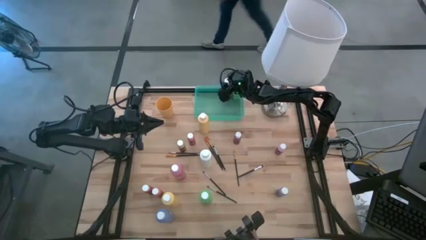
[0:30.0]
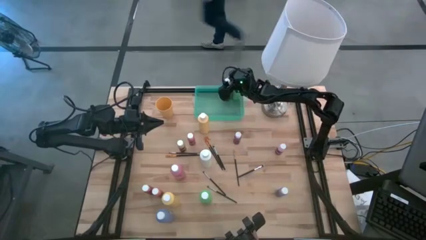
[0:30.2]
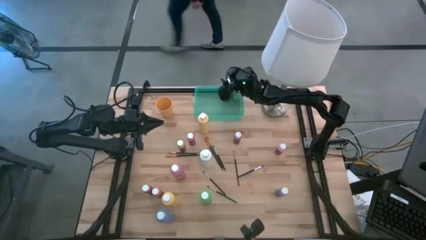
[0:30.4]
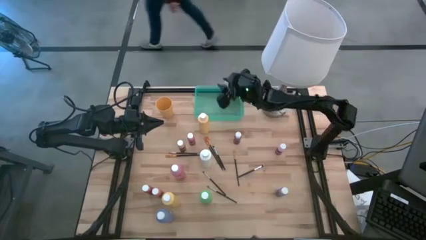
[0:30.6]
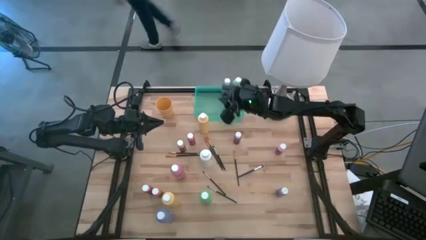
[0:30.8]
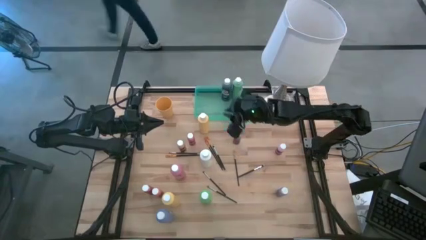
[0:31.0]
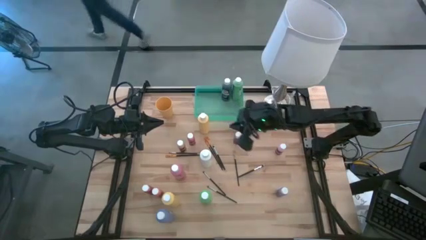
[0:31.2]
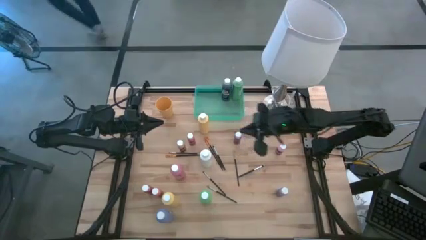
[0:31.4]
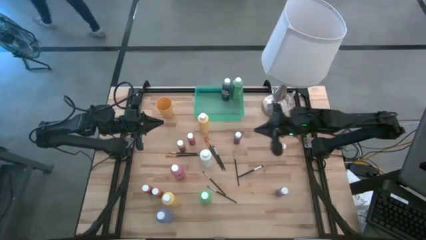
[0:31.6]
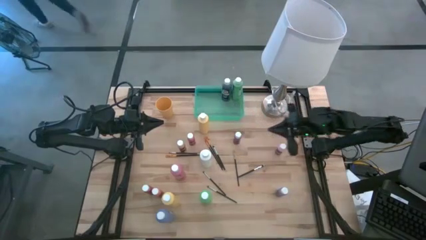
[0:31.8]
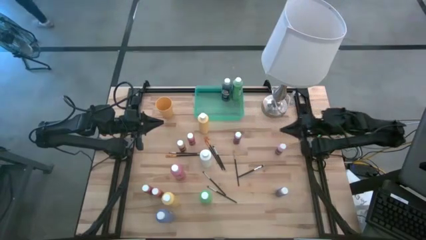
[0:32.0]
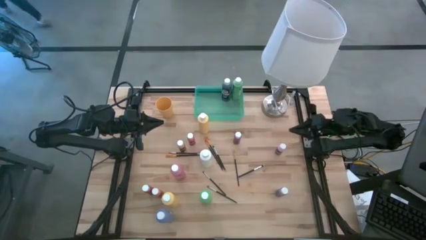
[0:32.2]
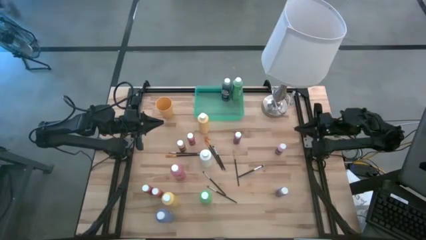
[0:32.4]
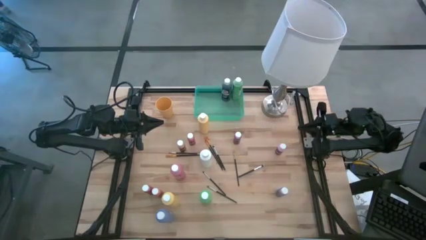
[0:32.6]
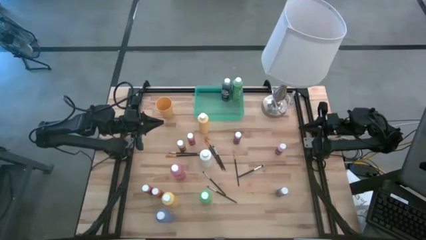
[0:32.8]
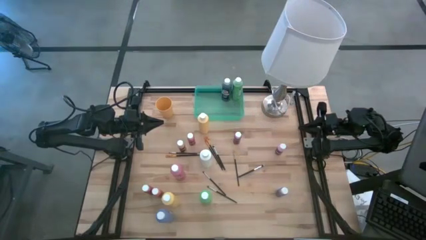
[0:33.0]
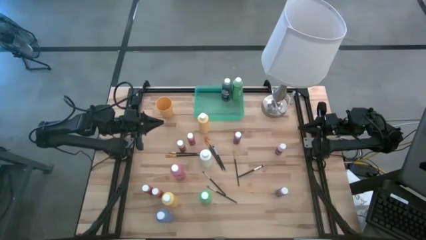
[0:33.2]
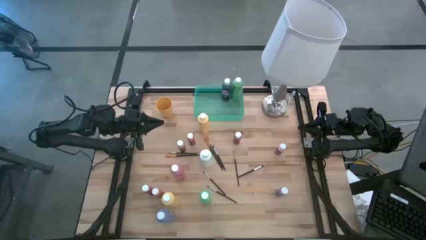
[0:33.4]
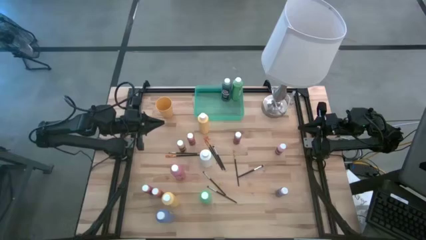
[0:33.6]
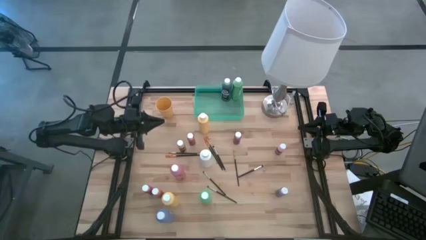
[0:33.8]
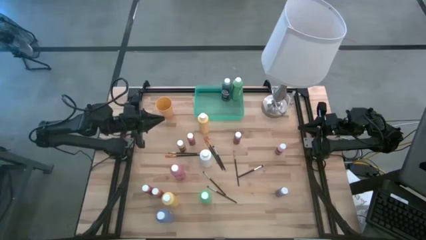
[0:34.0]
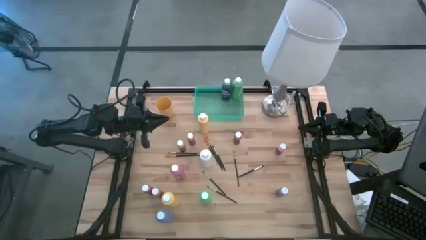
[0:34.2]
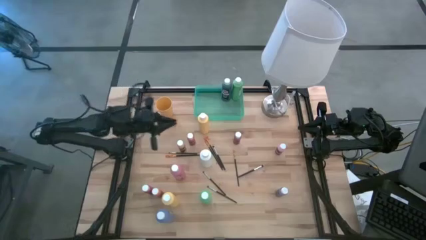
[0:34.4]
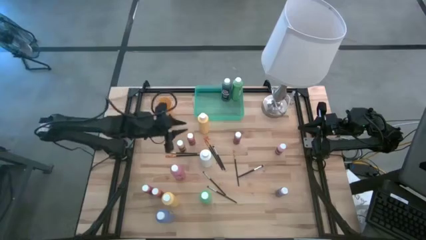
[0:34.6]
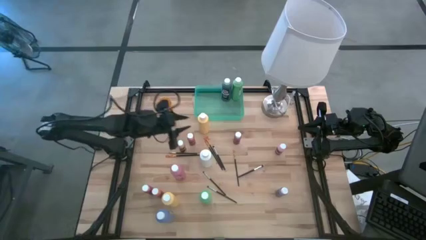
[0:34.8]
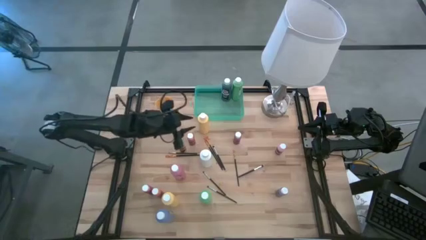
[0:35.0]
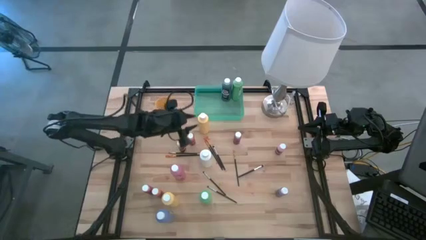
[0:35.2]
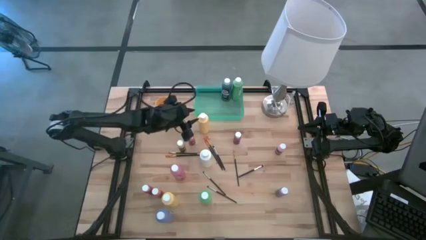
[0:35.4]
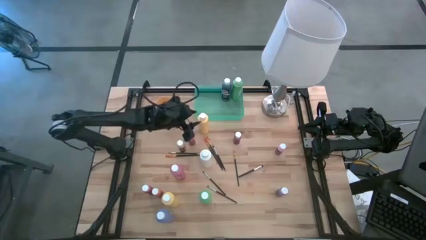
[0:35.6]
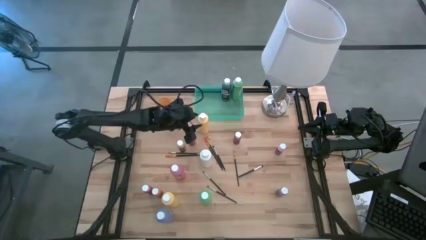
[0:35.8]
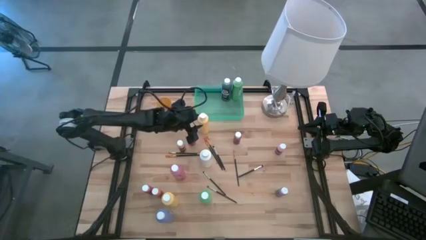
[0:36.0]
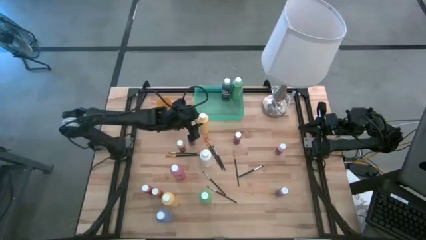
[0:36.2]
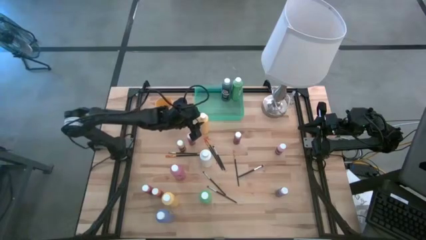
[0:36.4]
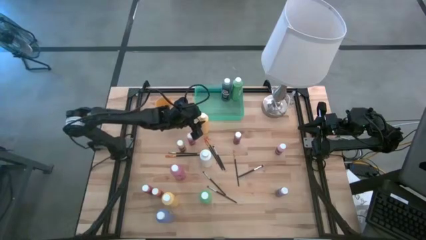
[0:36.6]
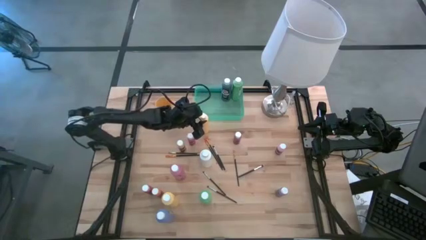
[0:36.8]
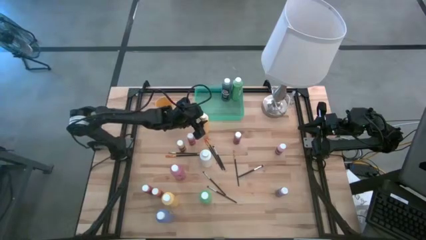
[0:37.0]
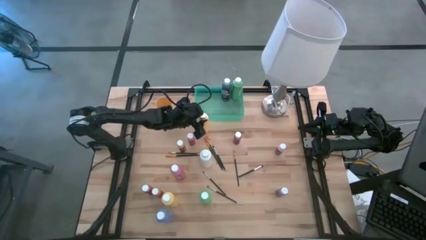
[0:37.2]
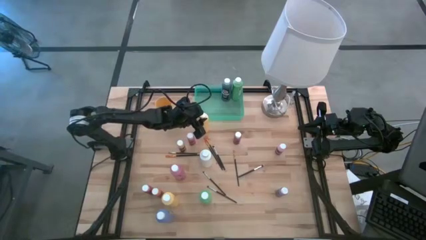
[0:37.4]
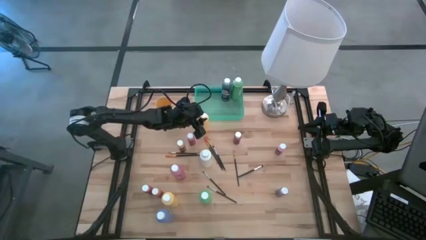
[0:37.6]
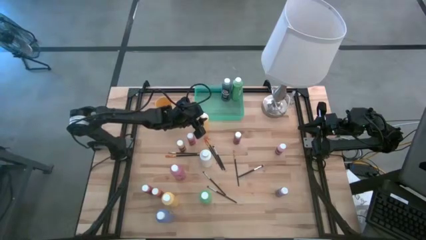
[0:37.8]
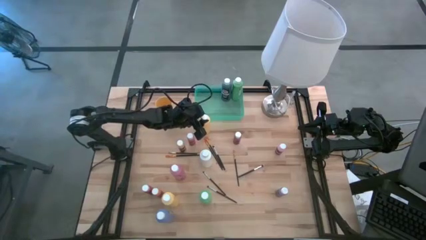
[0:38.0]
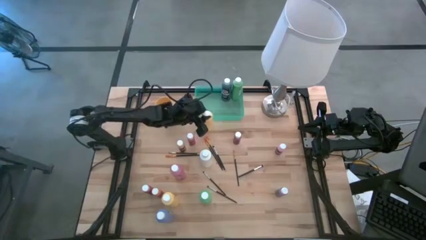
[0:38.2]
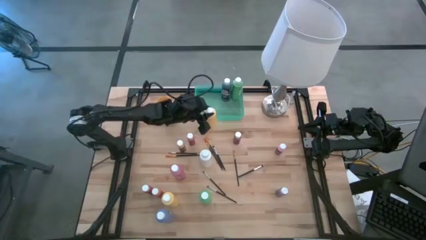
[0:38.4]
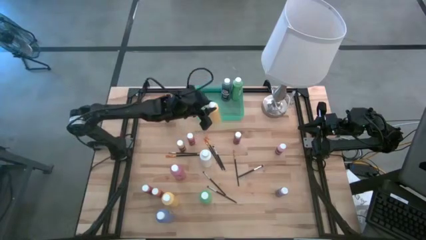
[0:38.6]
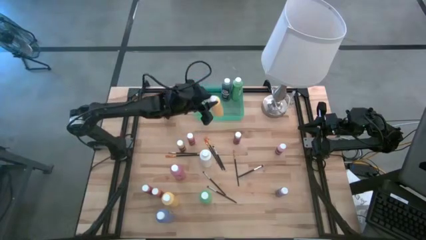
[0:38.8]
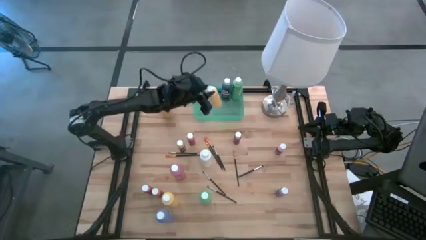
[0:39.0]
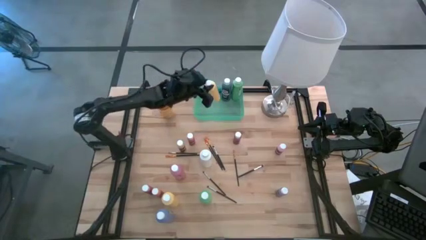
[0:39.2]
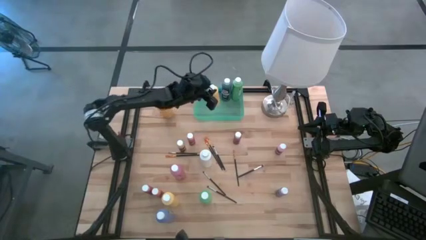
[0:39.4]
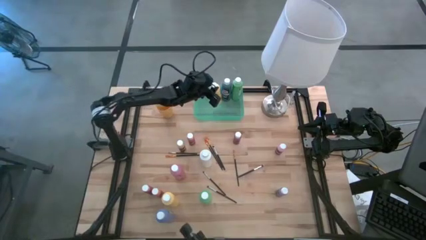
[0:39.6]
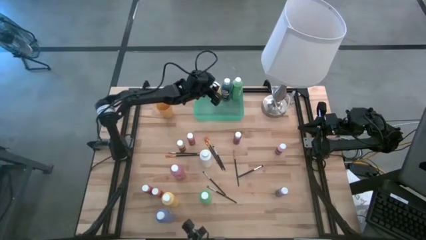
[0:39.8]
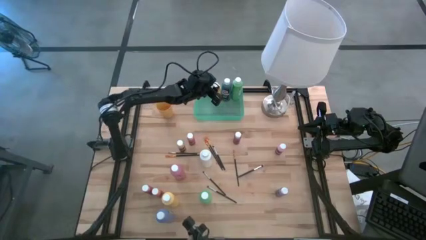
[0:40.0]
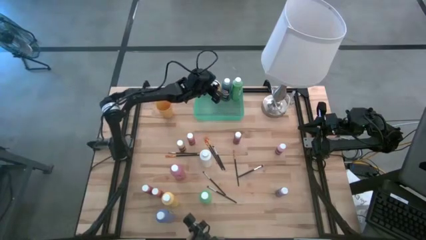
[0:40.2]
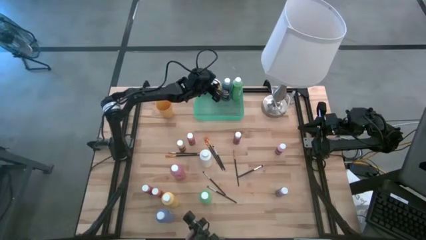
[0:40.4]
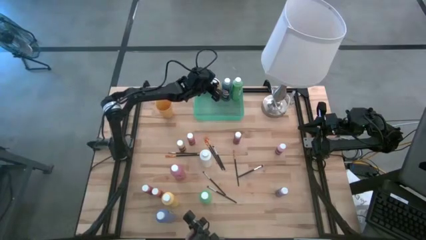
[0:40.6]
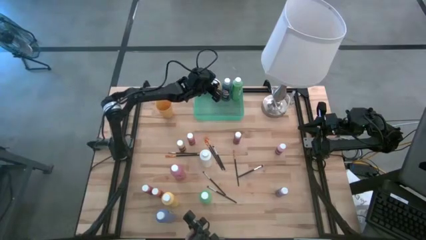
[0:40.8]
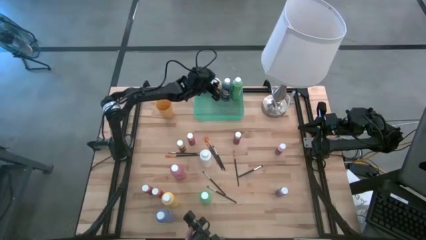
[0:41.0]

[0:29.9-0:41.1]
Task: Pick & Place Paint Supplies
Put the large yellow paint bottle into the green bin
